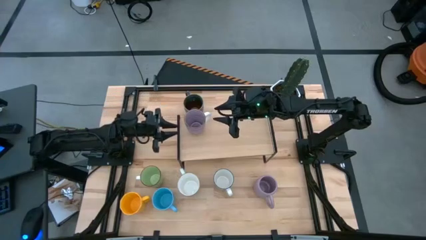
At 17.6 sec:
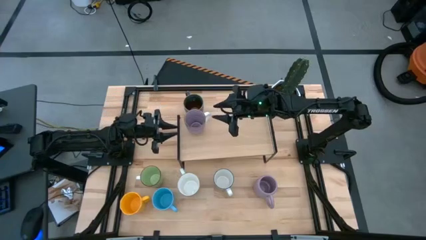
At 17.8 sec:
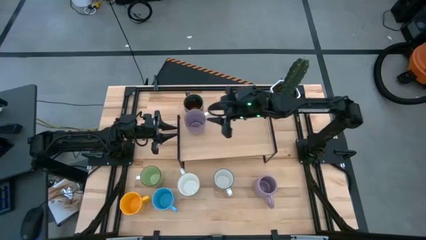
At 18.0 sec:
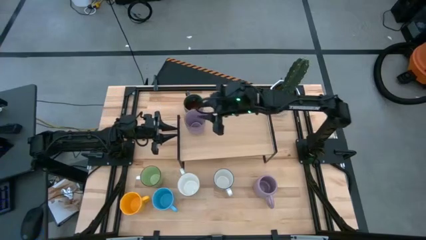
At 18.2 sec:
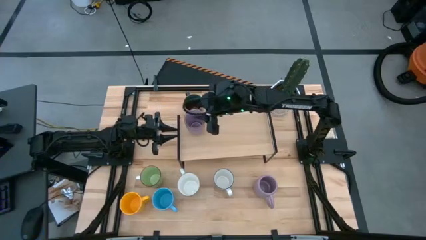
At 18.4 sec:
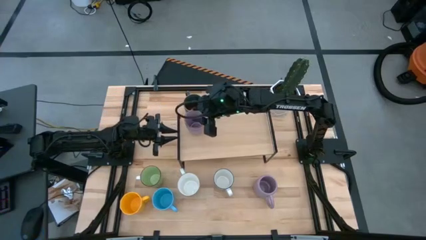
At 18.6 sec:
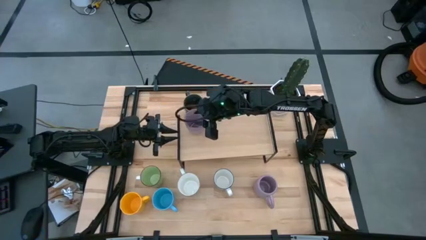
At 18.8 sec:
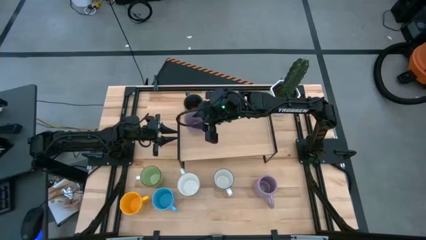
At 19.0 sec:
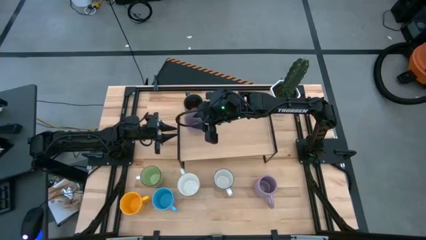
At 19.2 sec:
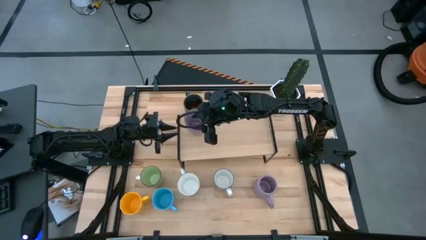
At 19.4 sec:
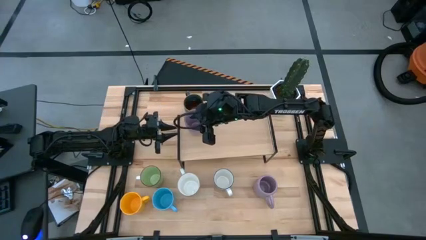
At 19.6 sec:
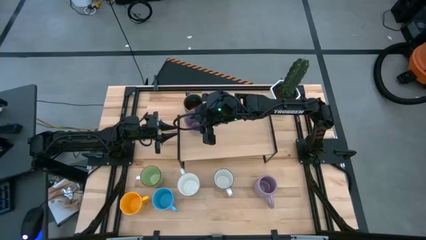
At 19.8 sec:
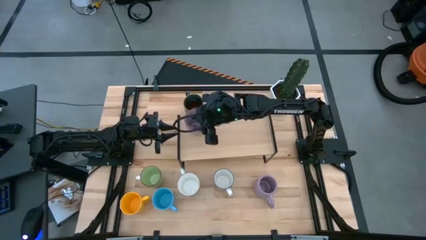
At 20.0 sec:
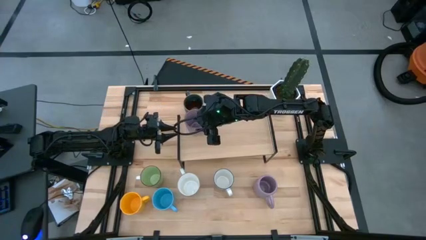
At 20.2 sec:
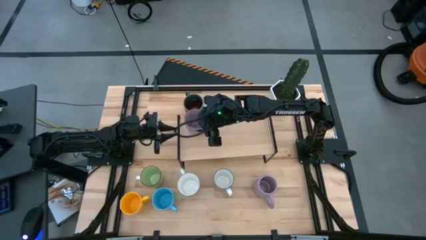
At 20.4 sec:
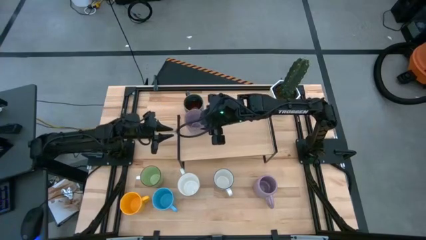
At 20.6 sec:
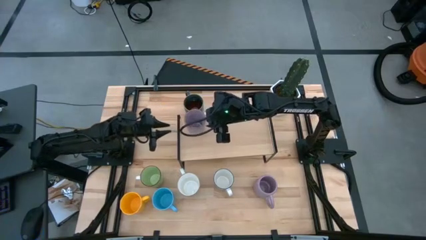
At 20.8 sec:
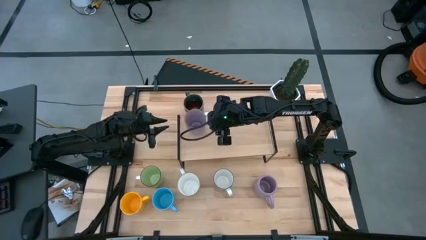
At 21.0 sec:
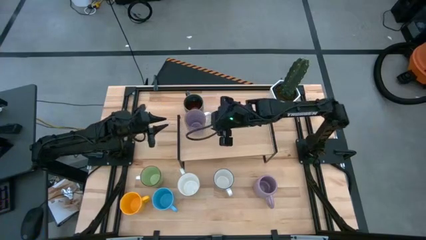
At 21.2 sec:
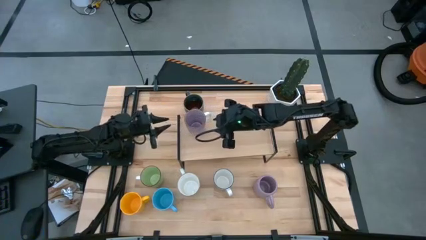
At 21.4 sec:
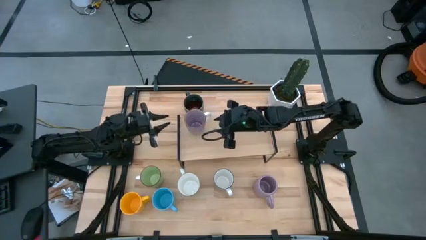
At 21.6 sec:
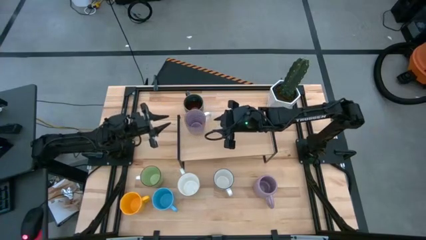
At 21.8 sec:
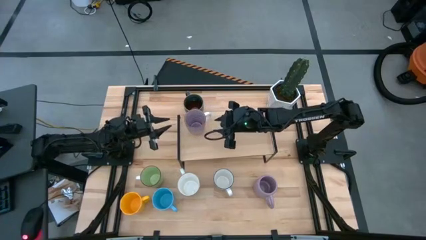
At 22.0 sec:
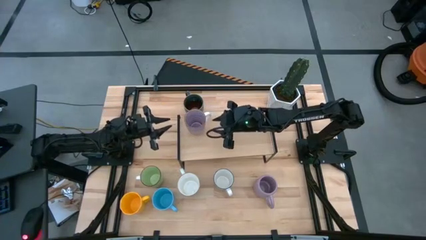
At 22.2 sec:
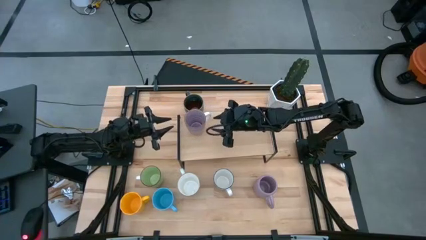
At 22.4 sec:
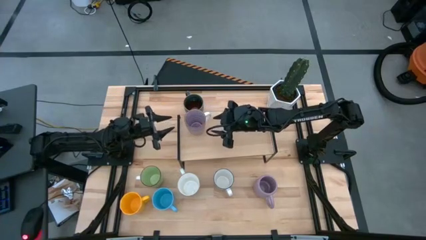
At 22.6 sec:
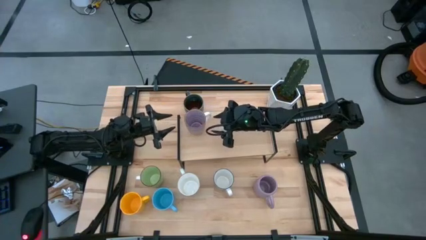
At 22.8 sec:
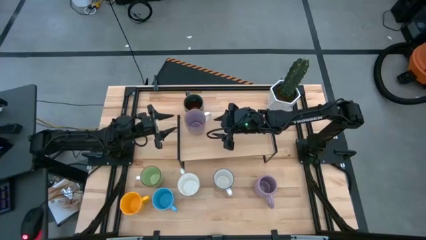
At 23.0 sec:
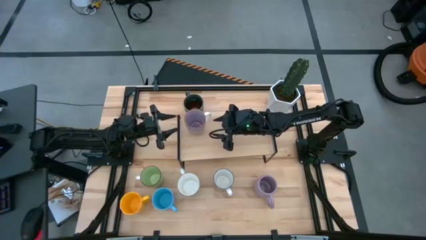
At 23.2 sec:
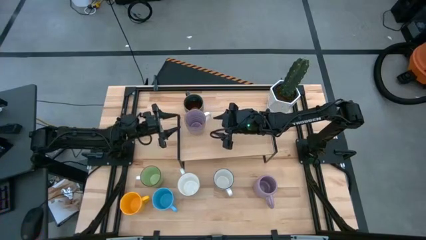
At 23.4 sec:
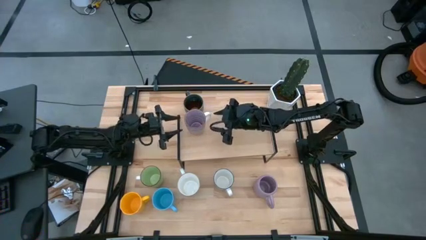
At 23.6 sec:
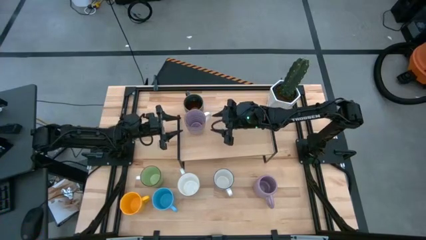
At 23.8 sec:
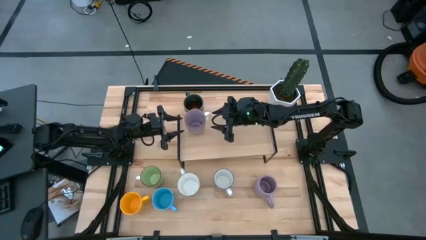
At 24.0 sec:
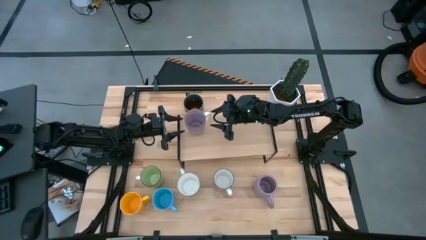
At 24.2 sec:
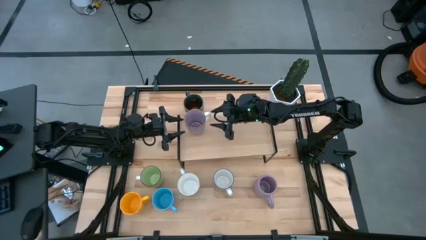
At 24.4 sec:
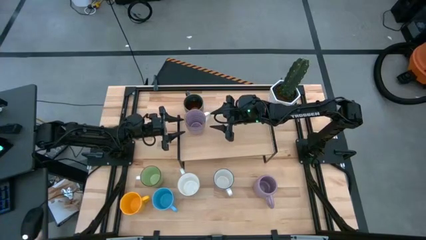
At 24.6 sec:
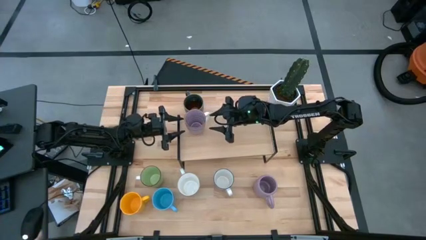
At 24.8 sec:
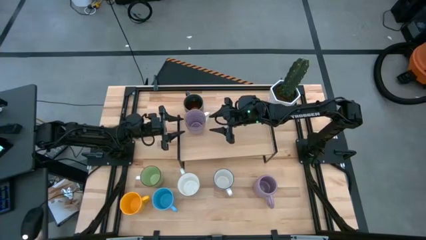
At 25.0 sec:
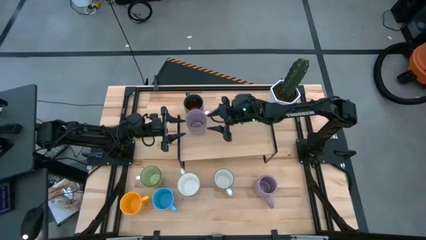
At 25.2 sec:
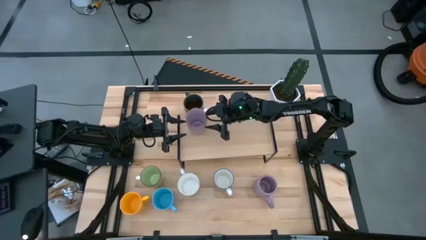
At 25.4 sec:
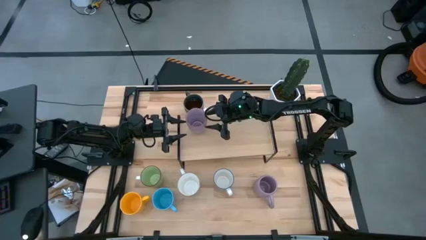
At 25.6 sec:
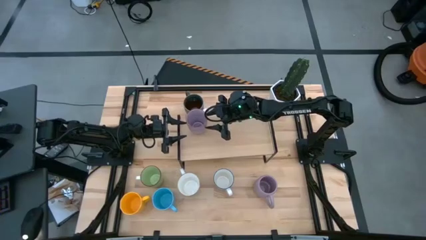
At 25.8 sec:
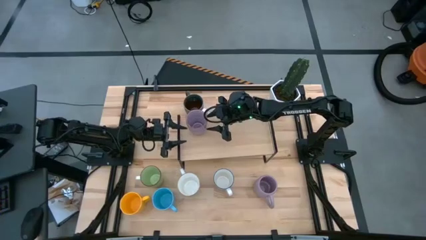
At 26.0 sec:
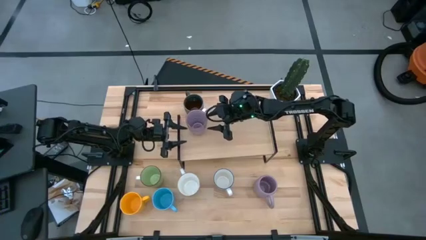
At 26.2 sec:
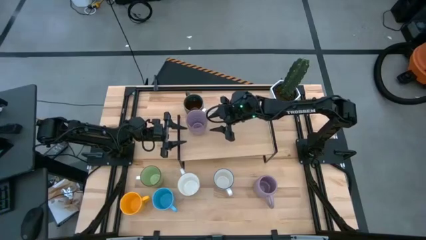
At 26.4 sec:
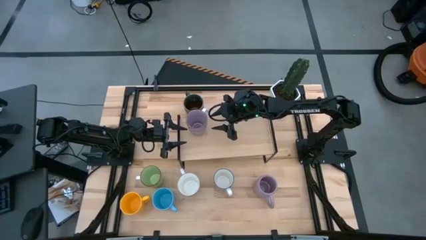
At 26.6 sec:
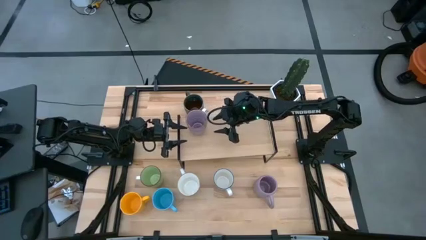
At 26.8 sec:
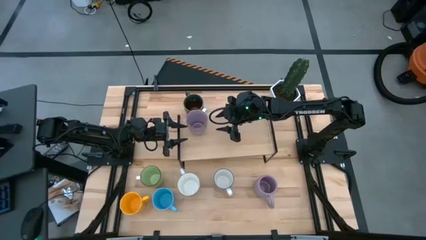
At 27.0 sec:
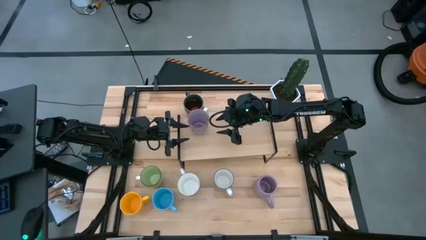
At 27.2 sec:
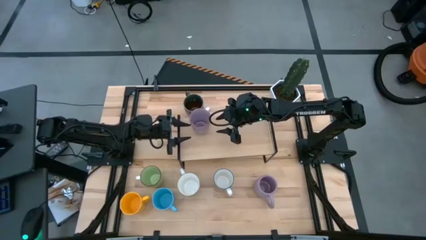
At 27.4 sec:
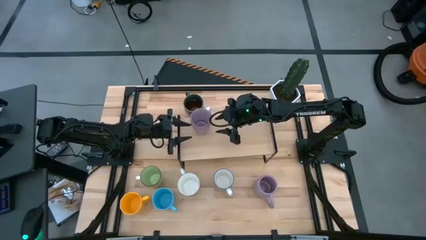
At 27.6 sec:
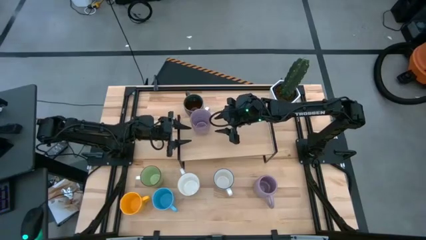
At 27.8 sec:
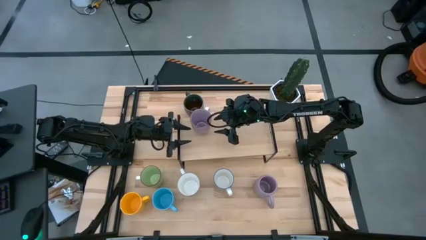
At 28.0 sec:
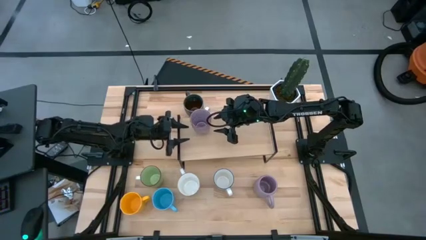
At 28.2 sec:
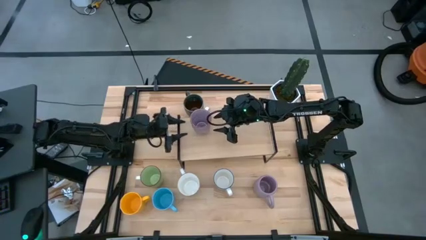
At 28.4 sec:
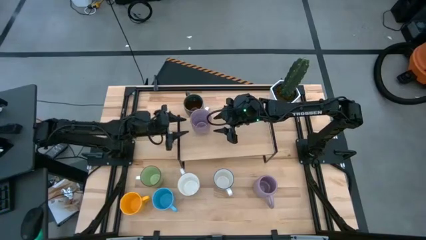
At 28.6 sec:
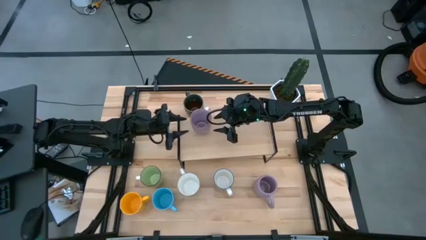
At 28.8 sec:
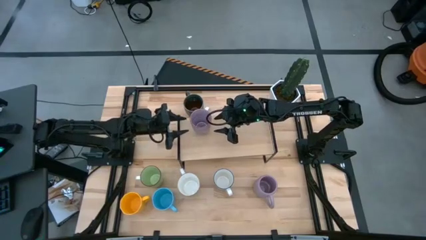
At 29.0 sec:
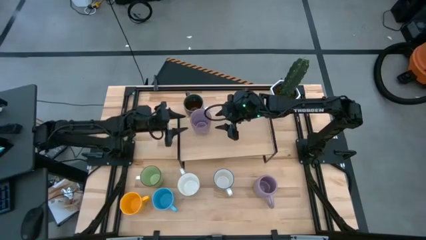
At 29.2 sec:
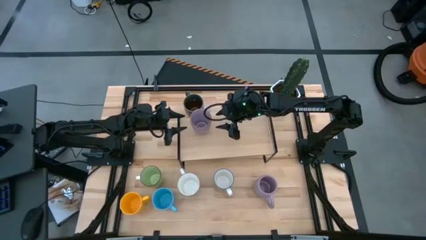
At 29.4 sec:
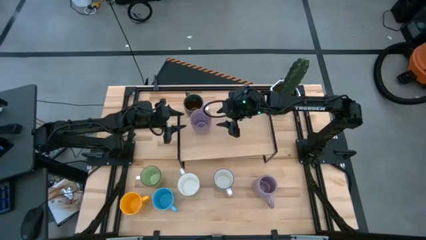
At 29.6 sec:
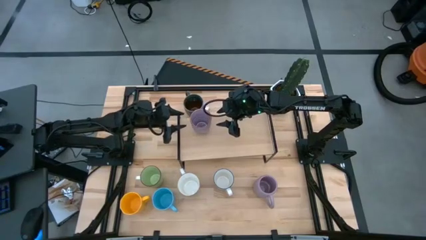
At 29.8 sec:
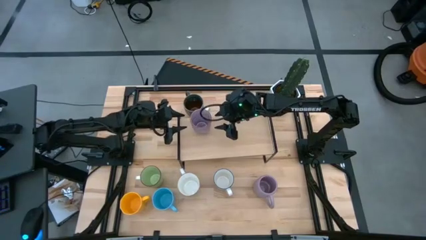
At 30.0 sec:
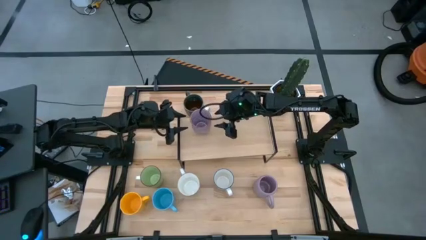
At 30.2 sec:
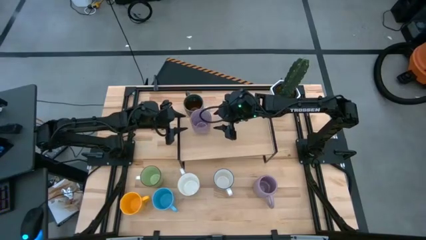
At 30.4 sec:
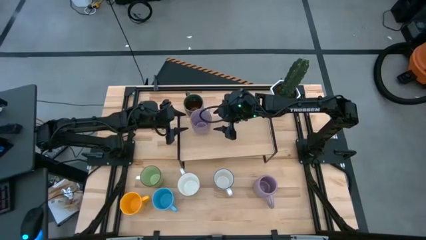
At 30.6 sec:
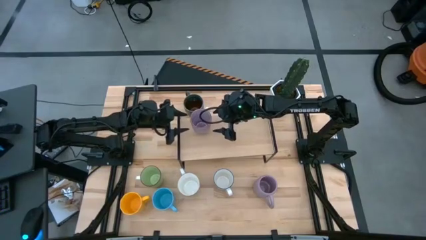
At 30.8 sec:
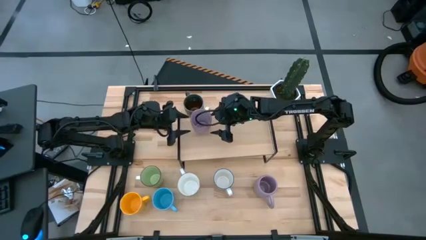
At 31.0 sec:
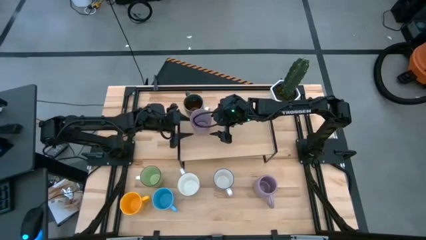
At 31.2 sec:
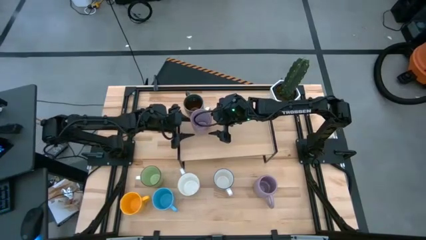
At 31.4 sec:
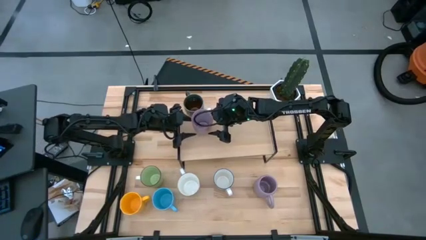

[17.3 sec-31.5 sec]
Task: Place coffee mugs
Put the top purple mug on the shelf

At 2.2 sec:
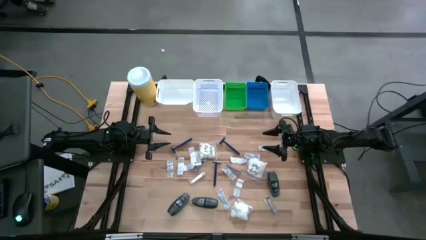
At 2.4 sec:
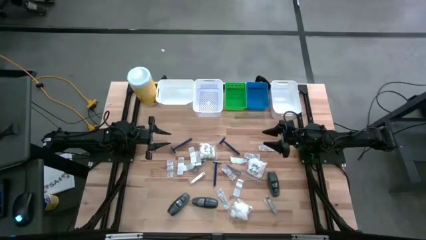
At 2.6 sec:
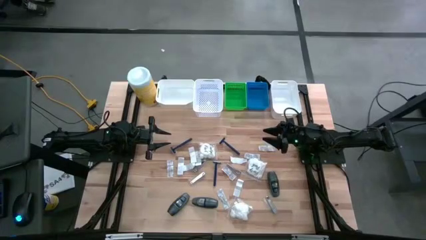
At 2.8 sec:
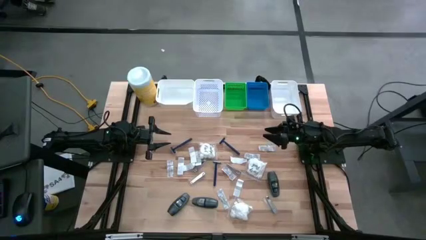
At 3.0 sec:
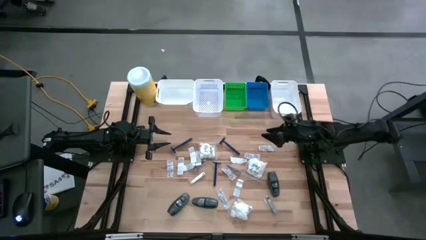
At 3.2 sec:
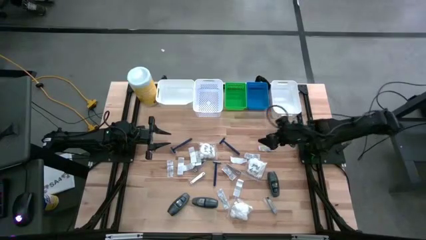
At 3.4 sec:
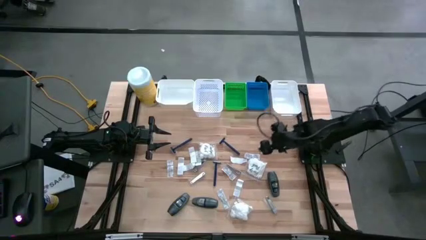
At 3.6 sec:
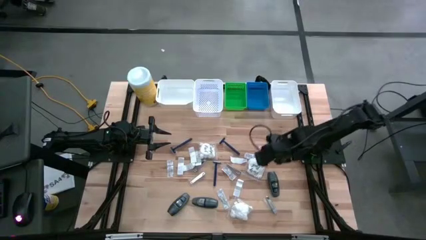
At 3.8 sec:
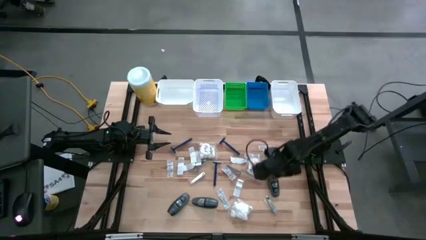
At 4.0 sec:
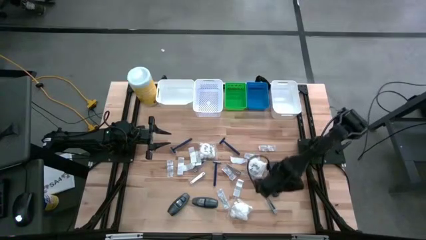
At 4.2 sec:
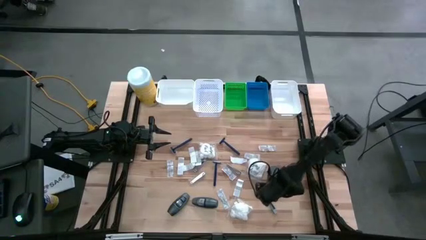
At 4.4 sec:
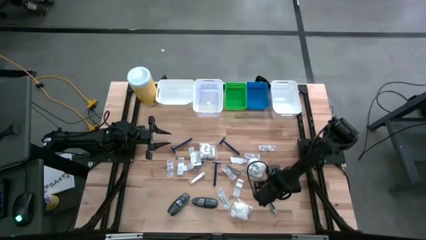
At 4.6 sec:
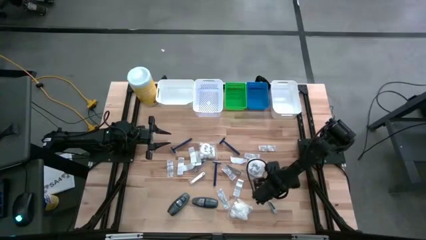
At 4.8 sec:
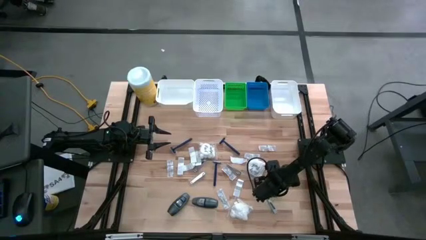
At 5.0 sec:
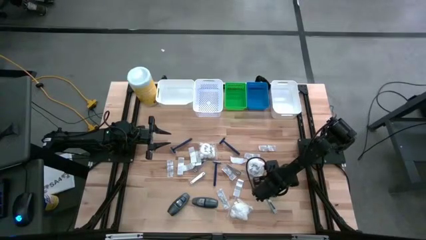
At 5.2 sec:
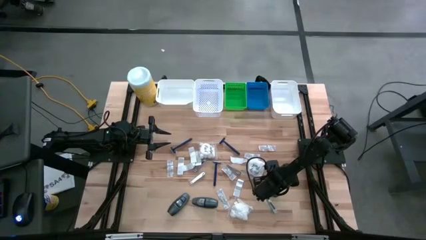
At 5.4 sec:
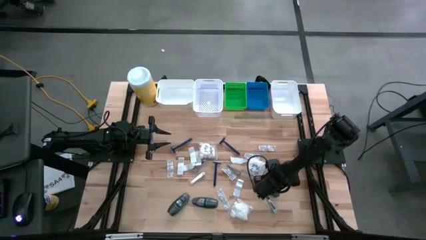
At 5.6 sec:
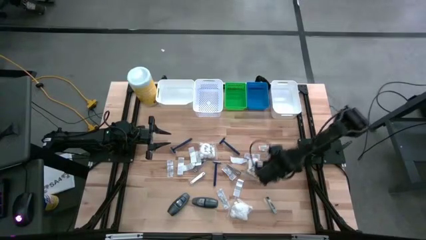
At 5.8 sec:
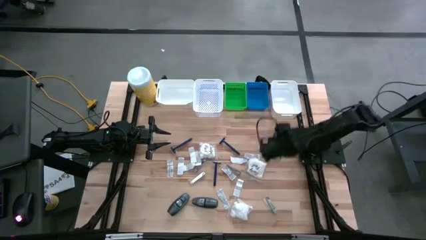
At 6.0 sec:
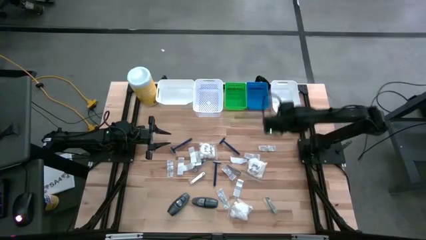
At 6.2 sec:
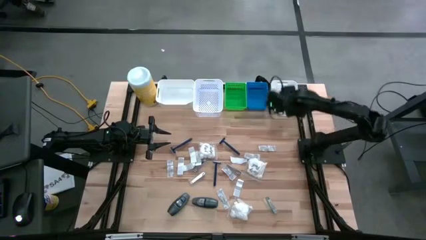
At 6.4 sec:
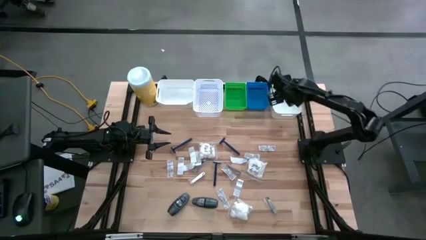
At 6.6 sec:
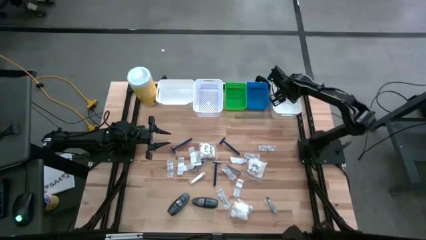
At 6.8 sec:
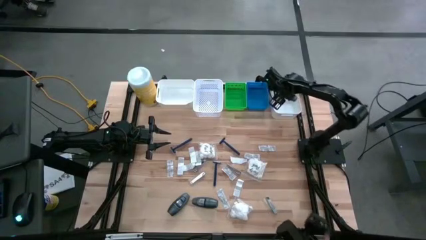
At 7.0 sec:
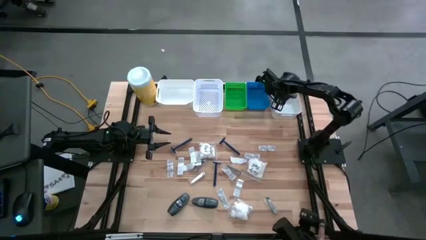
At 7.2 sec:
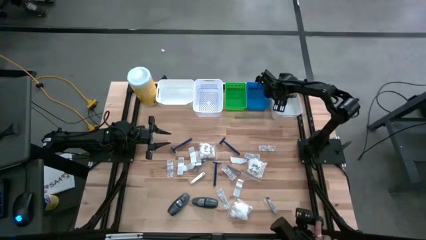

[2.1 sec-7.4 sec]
Task: Pick & Place Travel size toiletries
Put the black deodorant into the right white bin
